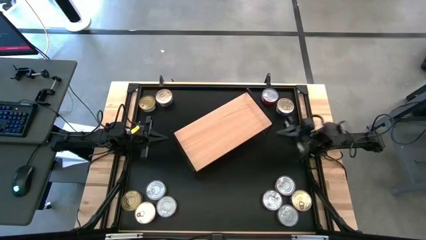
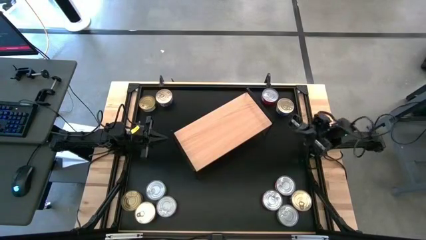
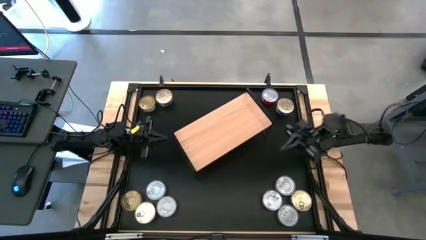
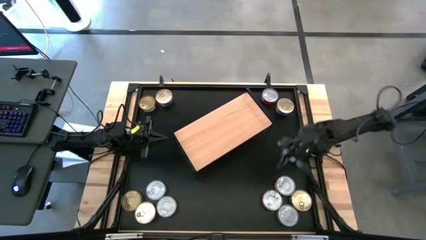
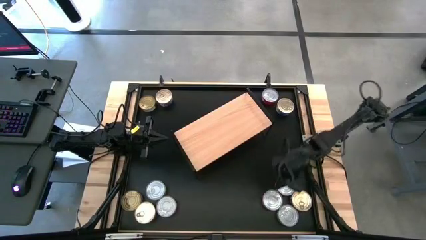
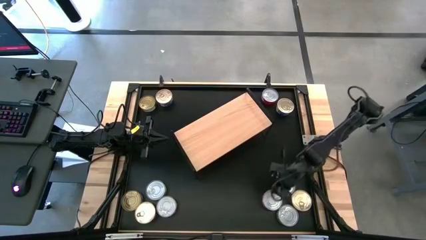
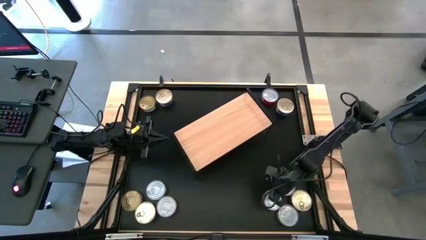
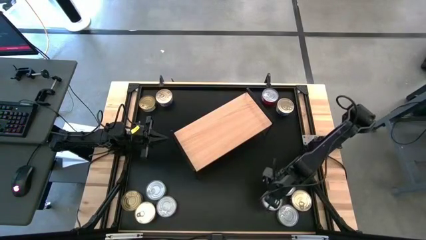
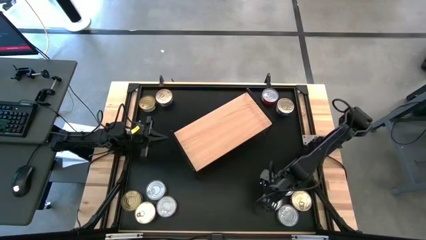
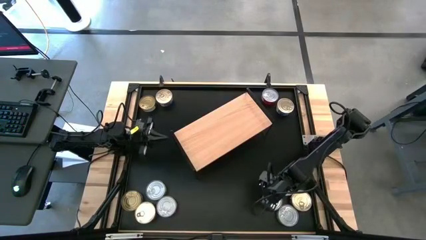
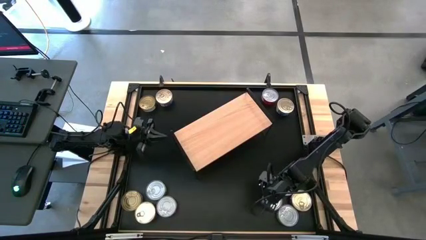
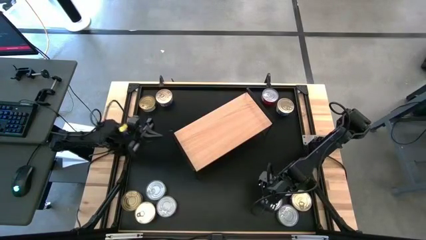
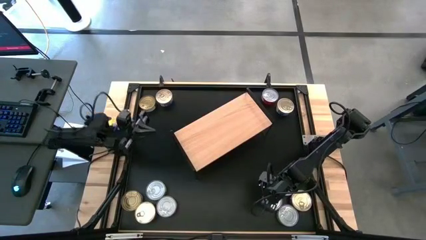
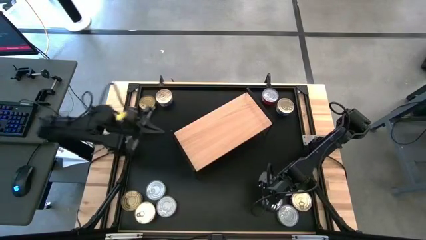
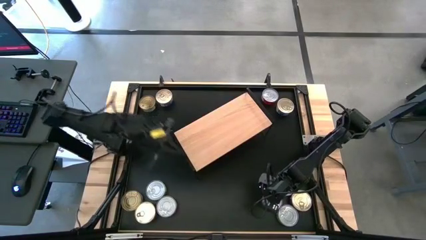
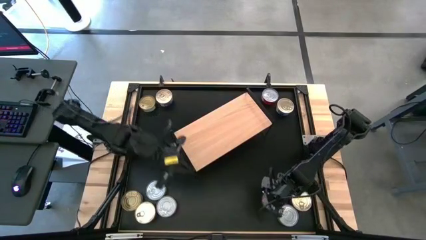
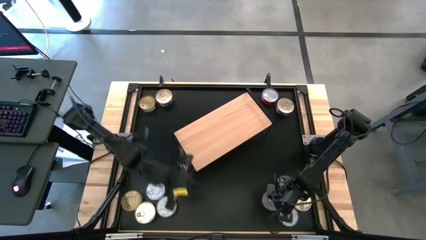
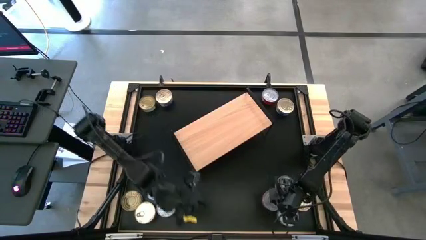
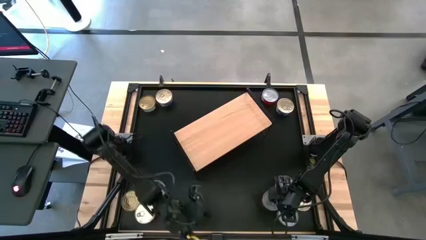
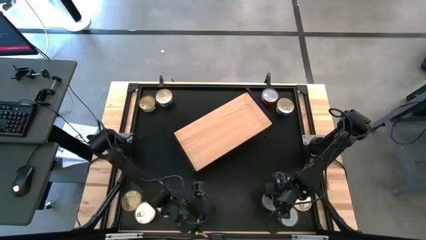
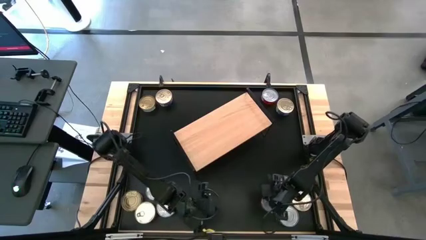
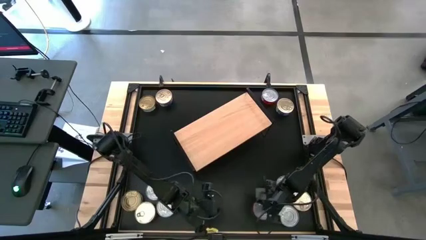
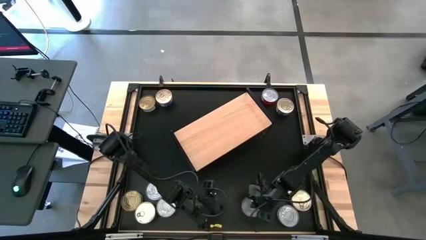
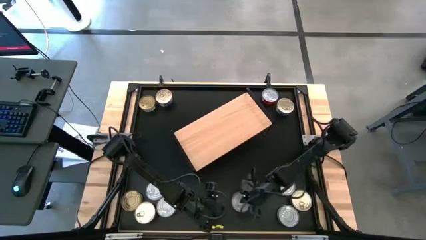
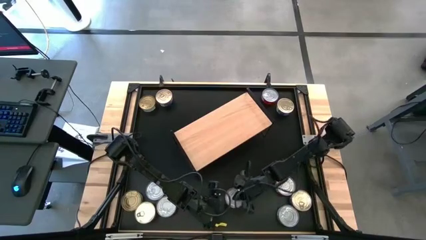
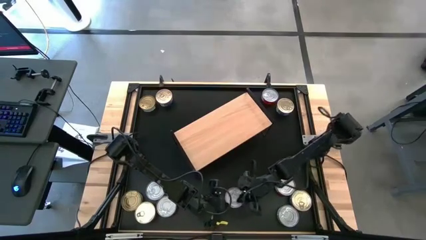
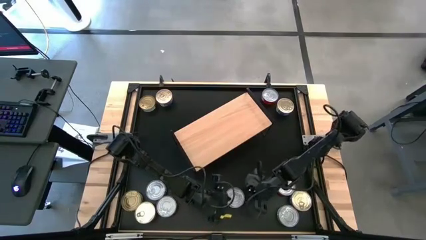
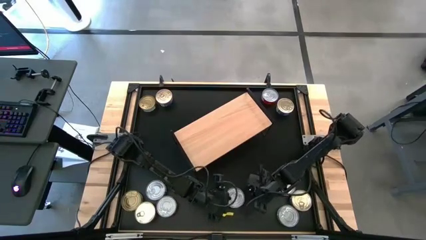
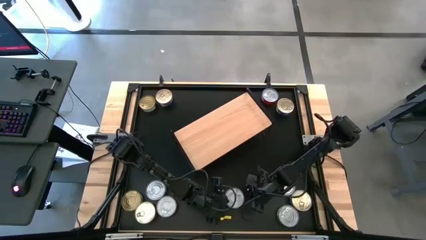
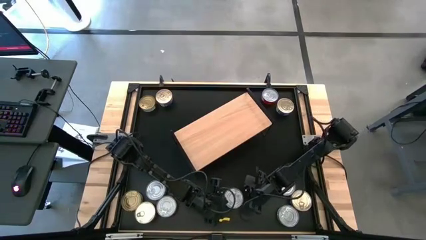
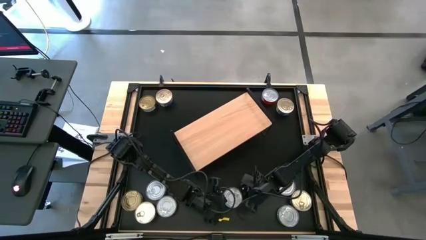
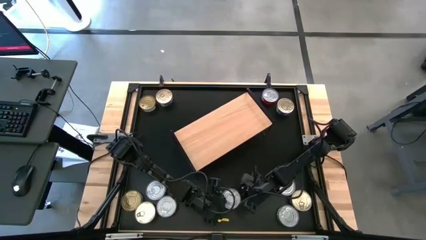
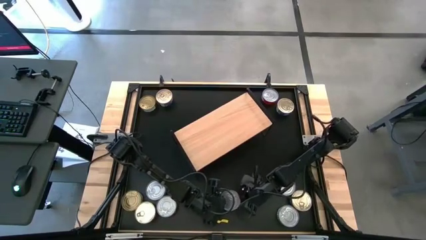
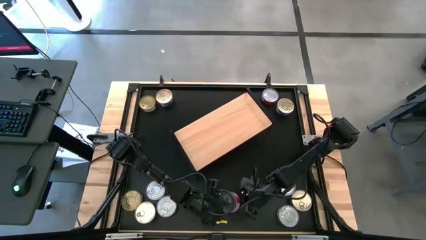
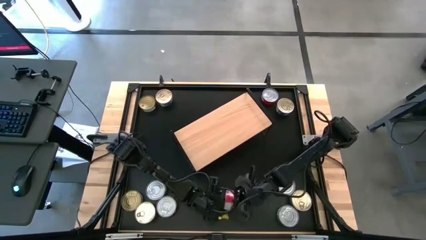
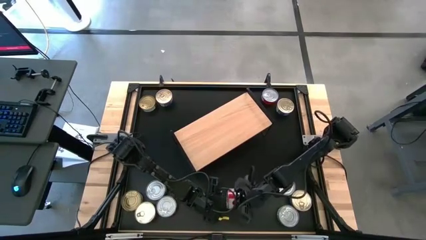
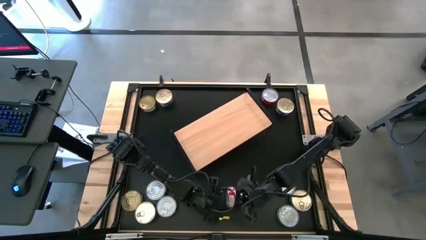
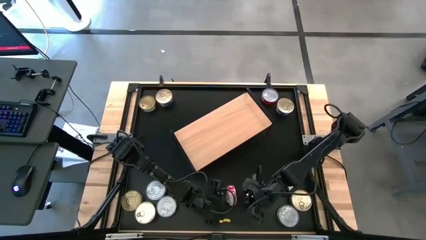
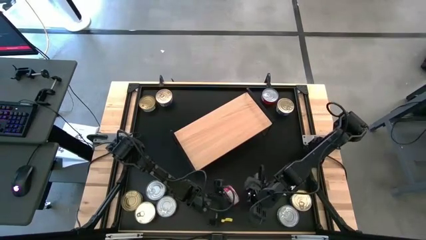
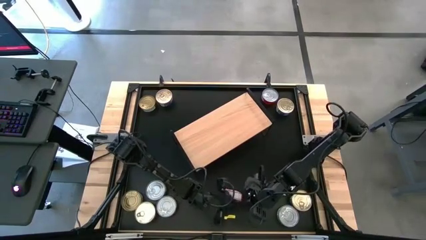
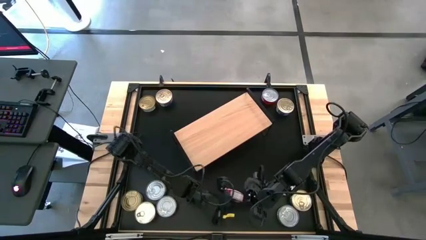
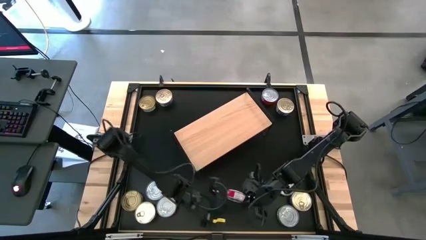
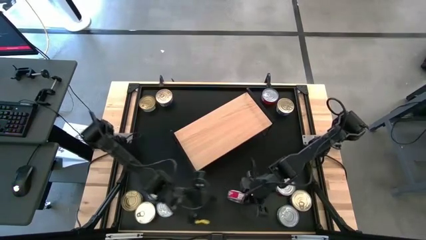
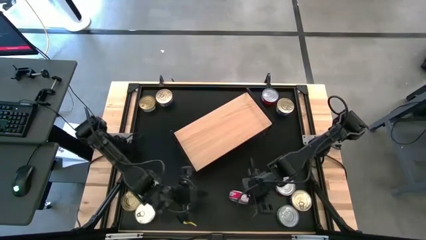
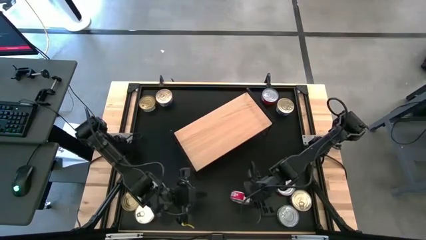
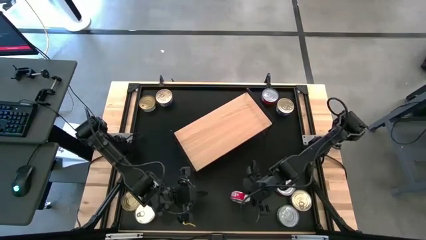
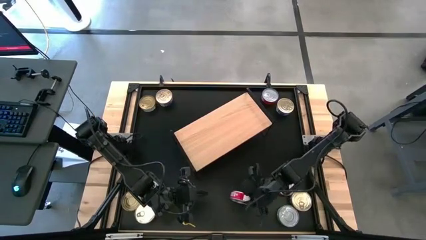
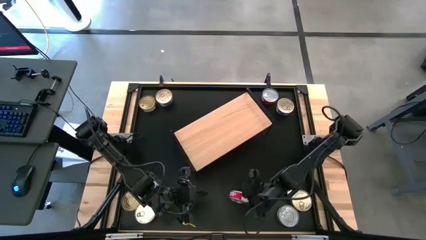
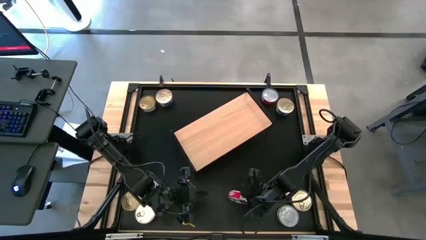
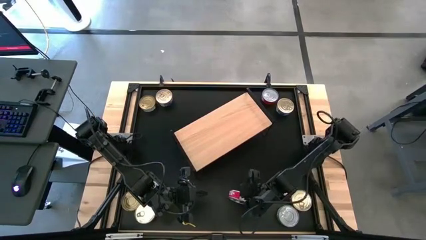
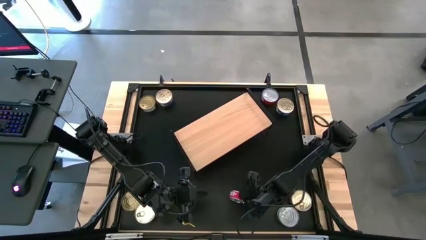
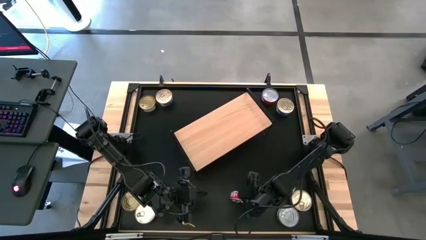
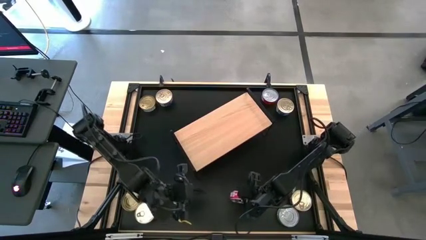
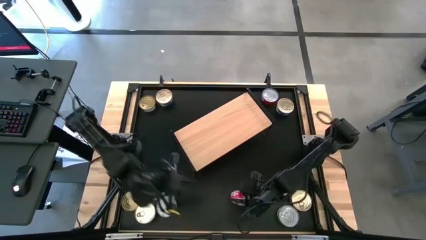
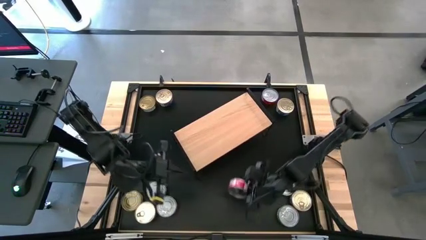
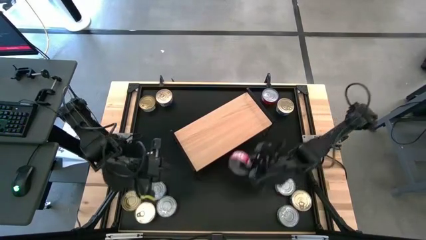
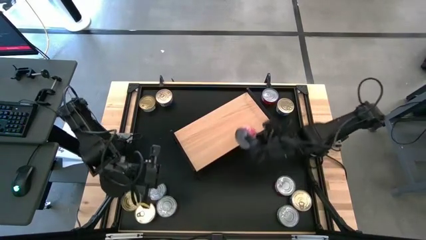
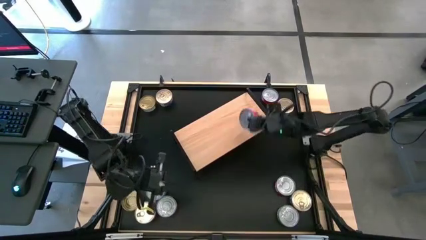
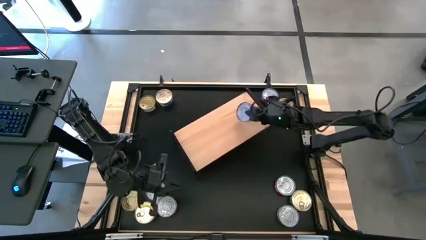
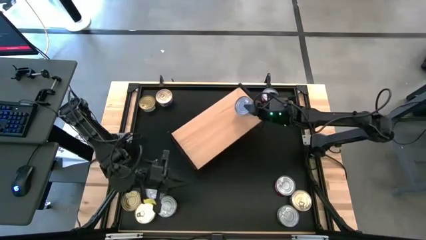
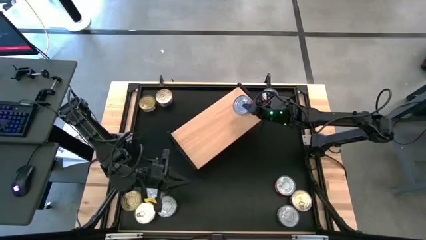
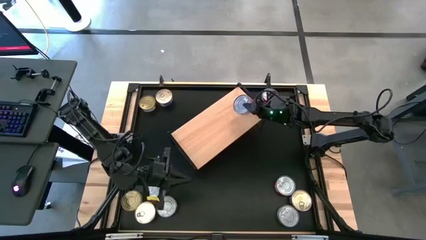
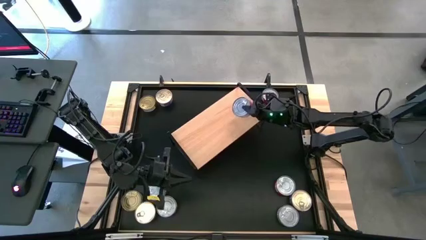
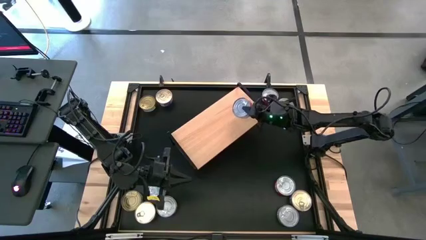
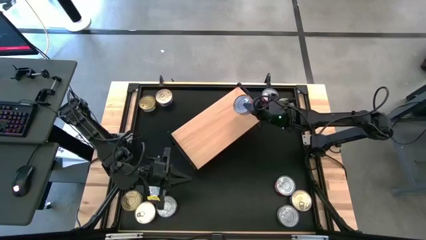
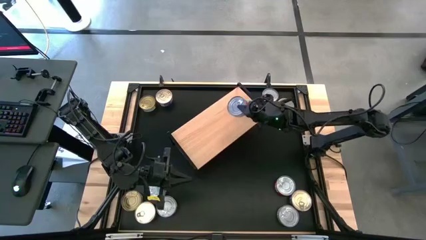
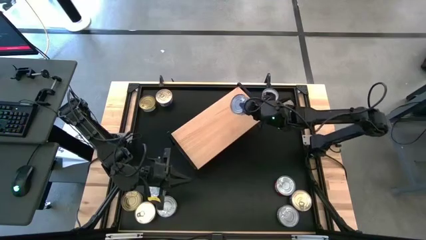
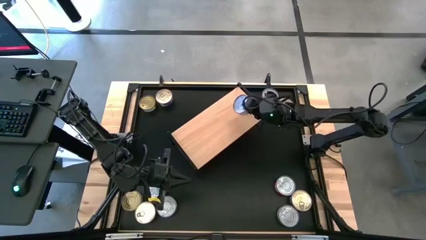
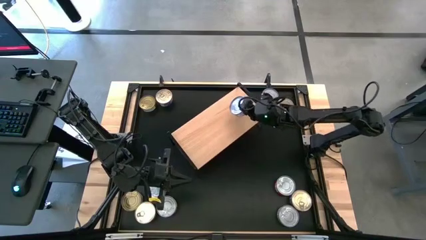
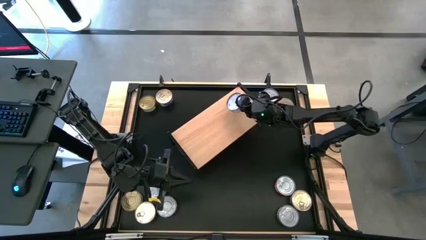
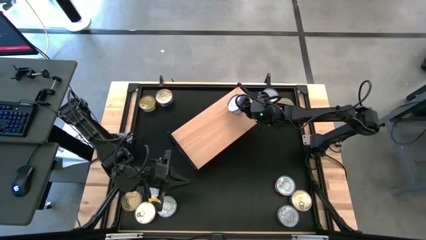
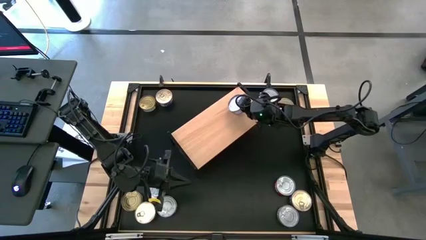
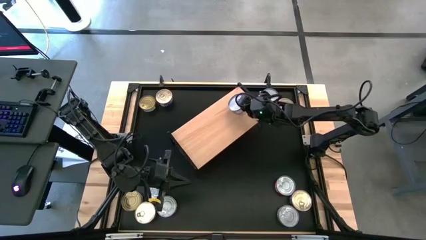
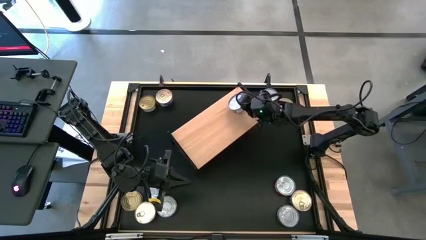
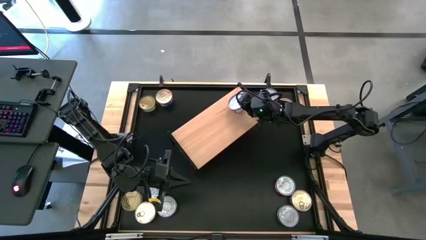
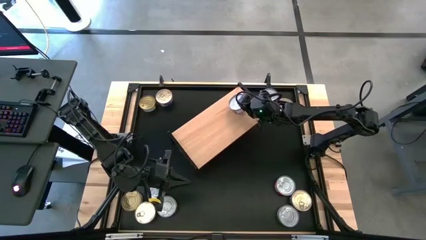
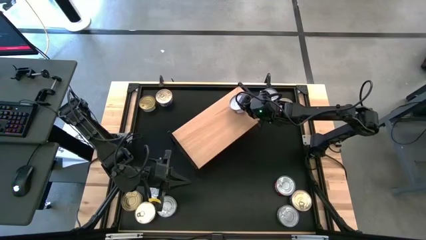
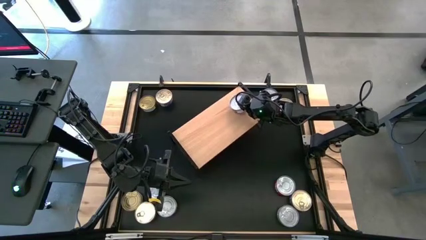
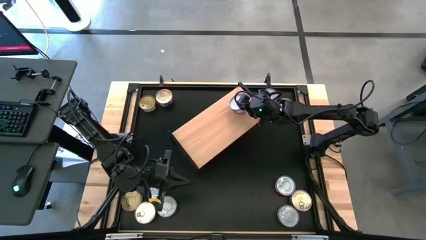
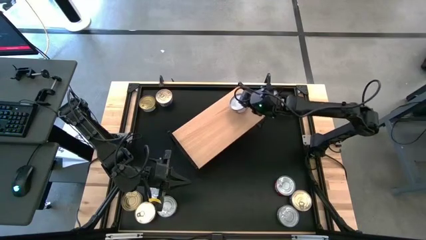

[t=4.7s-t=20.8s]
Task: Stack canned seafood by type on shelf
Put the red tuna can on the shelf
